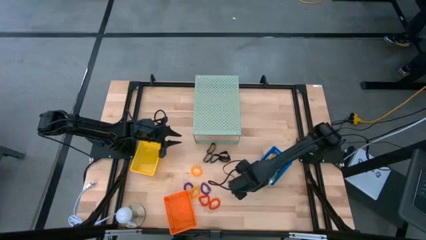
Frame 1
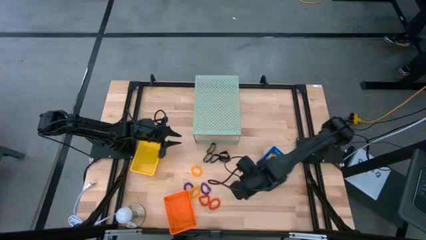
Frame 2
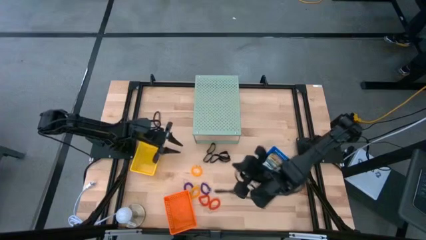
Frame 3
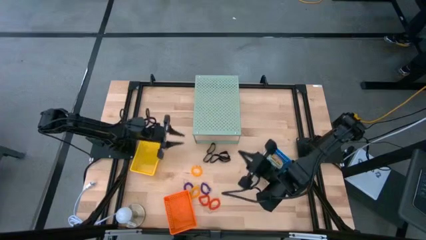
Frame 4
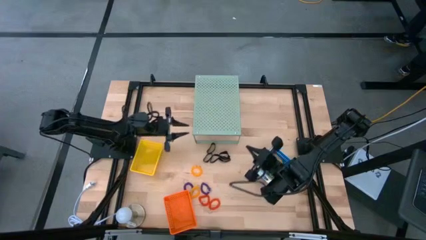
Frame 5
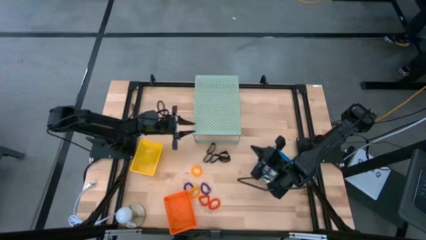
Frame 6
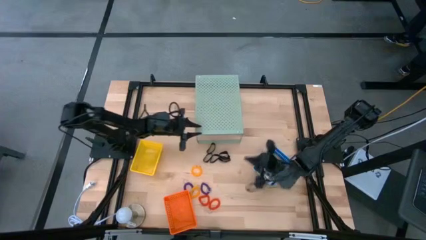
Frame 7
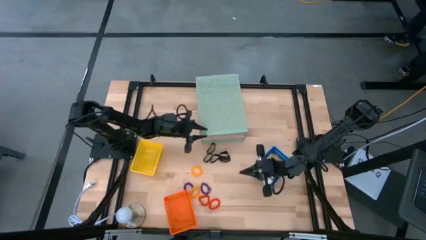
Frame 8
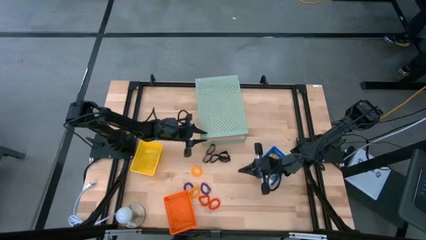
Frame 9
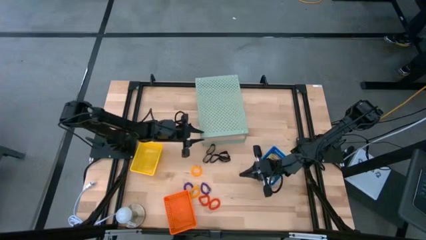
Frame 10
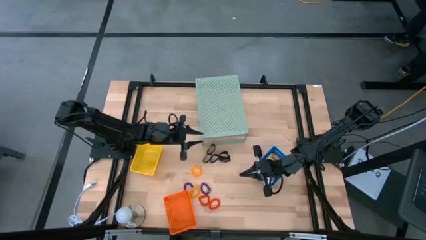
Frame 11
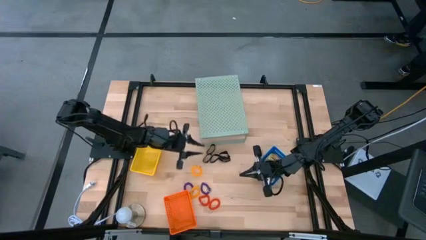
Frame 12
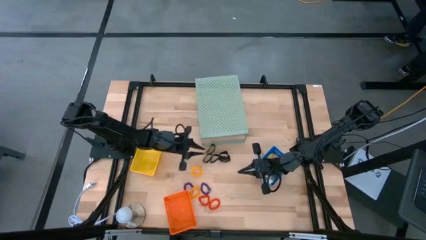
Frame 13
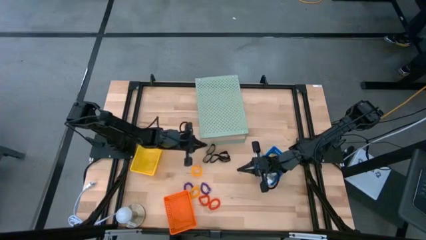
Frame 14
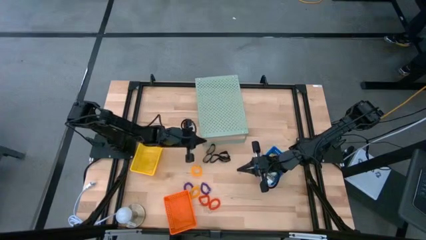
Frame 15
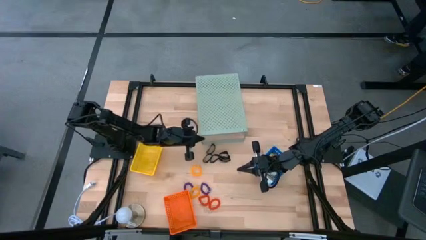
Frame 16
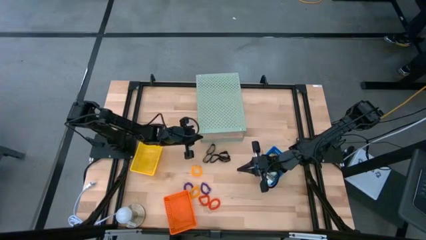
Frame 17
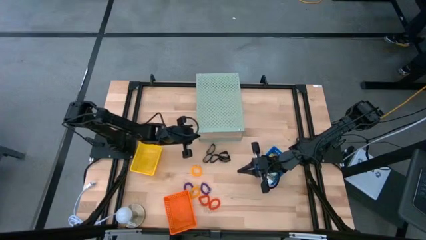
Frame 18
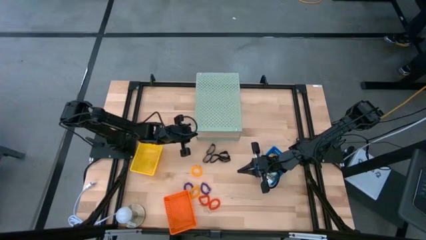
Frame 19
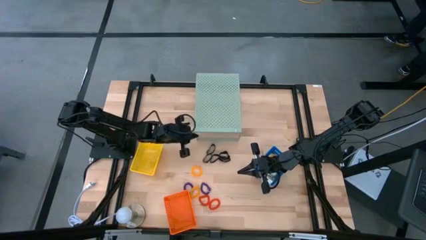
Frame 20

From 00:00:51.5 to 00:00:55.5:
Task: Pick & Place Office Desk Supplies
Adjust the shelf

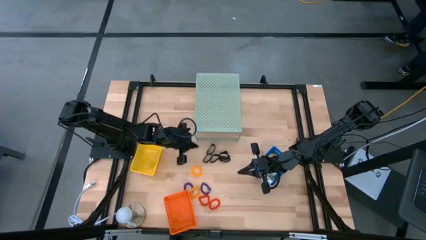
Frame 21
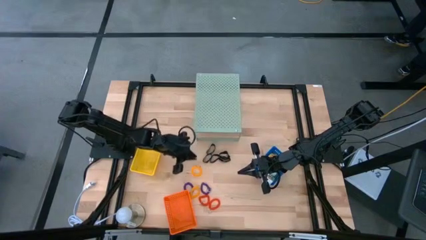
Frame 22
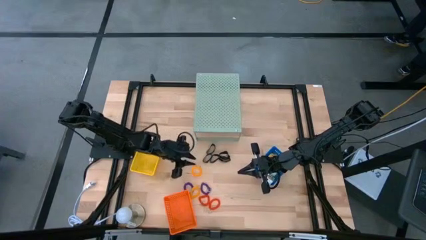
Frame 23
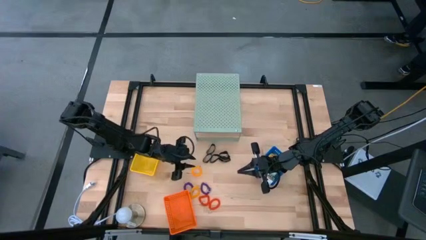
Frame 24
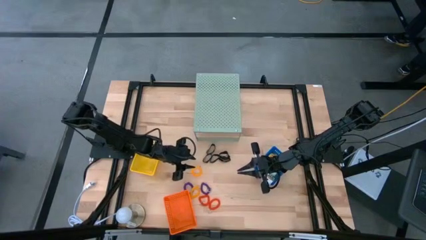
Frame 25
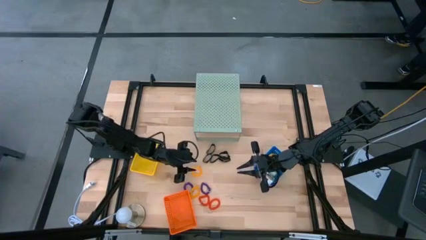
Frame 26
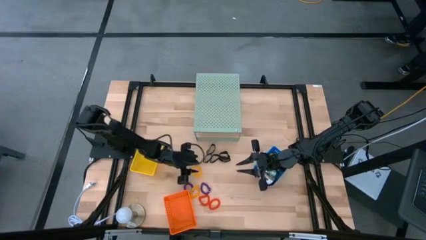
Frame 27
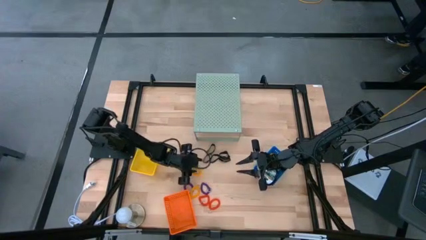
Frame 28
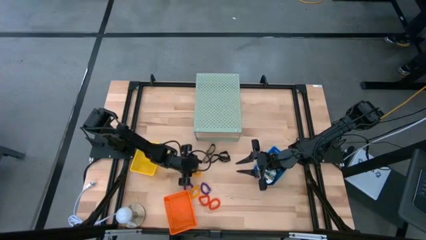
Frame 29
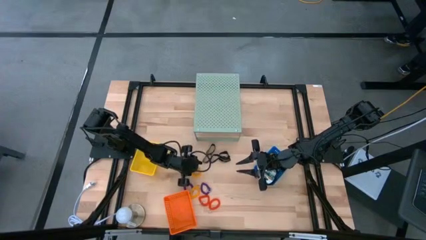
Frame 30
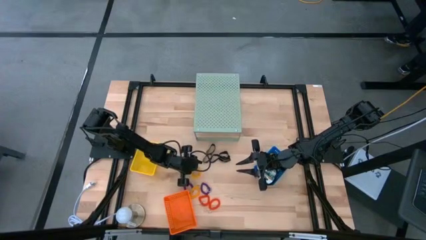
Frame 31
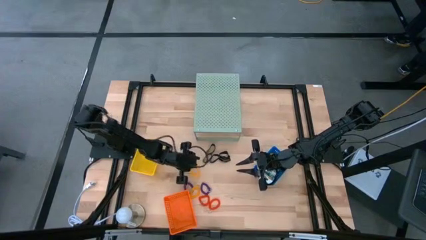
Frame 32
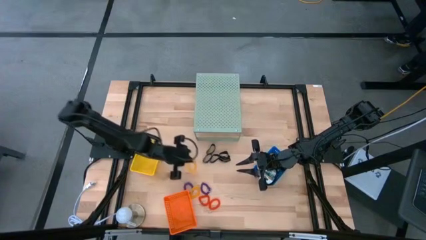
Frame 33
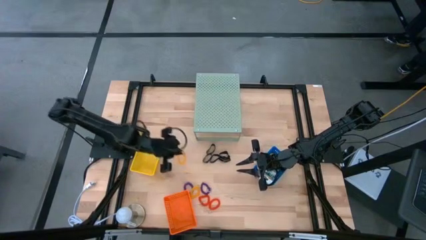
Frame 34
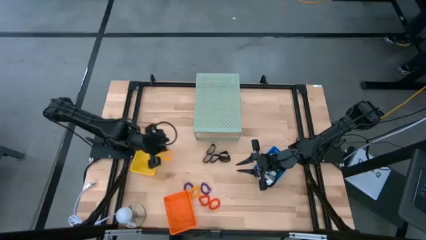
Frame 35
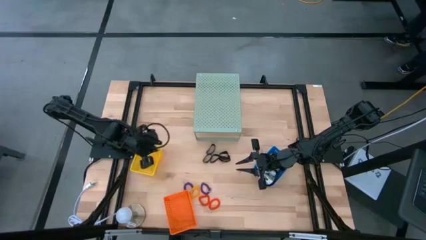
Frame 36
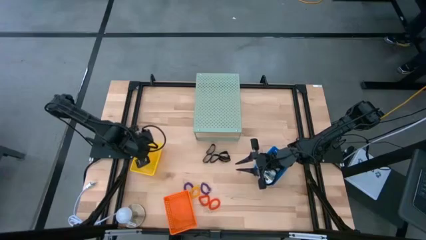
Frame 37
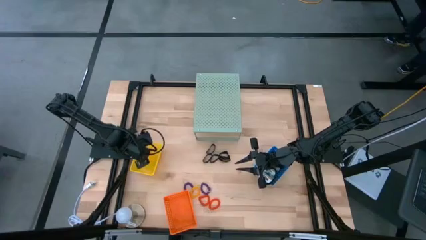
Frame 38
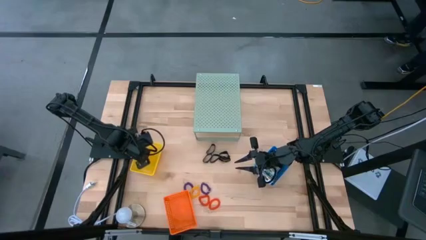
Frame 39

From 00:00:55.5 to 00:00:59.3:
Put the yellow spring keychain into the yellow bin

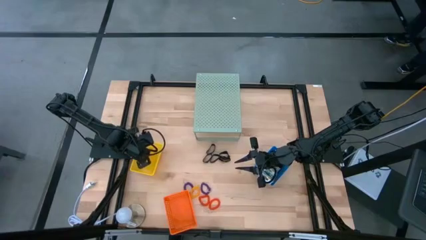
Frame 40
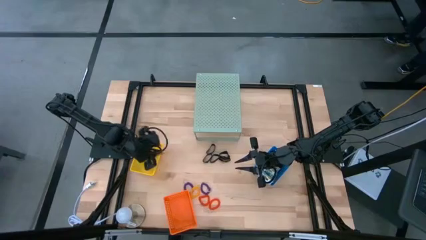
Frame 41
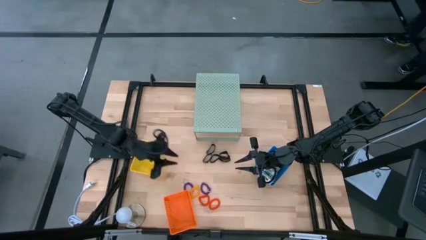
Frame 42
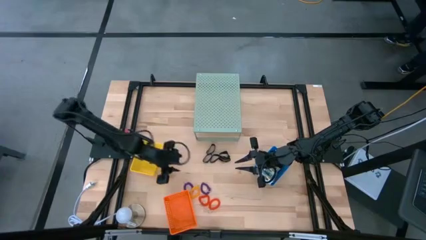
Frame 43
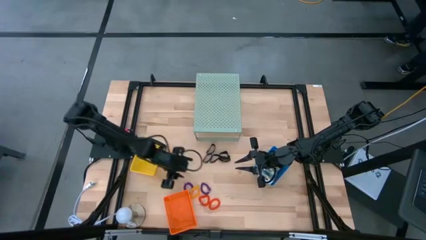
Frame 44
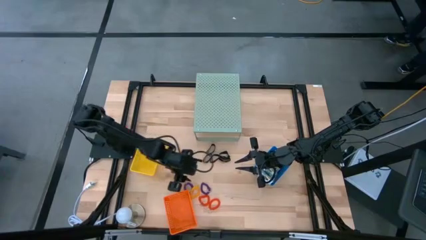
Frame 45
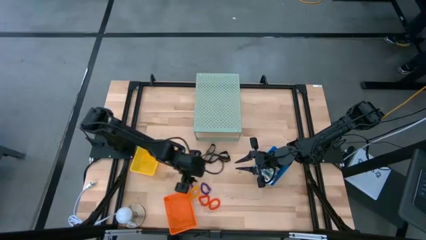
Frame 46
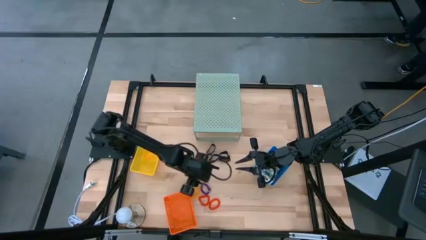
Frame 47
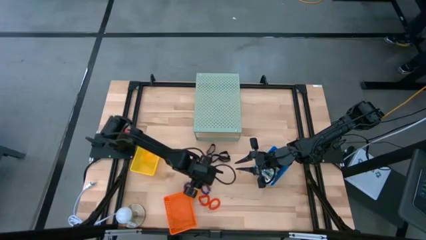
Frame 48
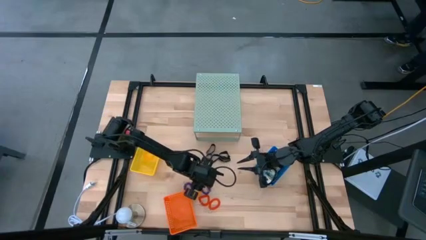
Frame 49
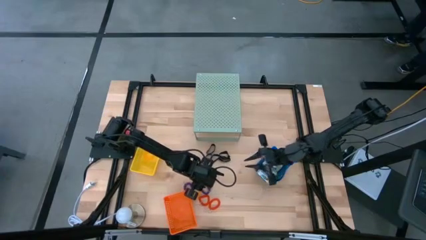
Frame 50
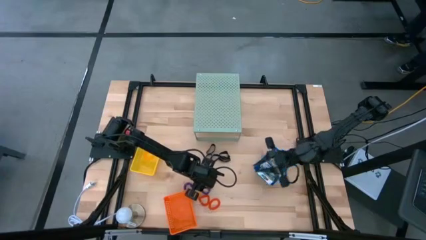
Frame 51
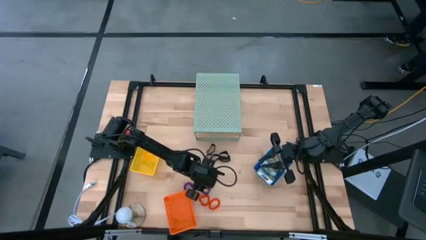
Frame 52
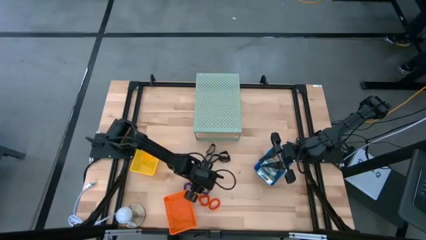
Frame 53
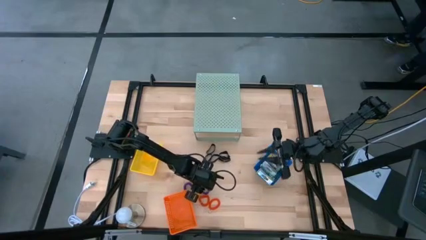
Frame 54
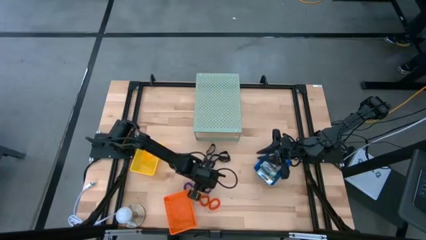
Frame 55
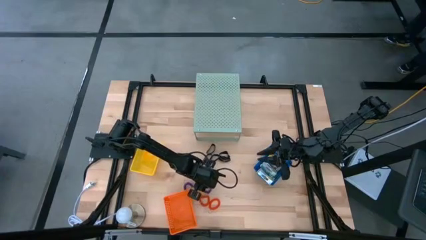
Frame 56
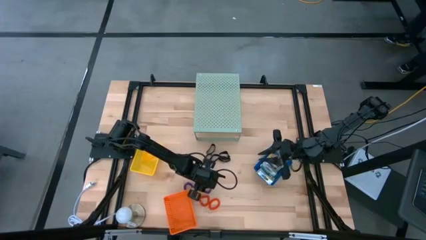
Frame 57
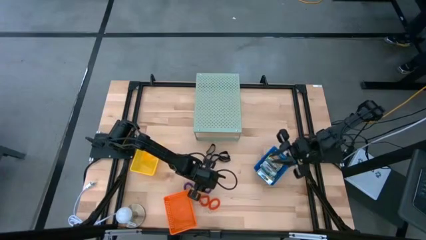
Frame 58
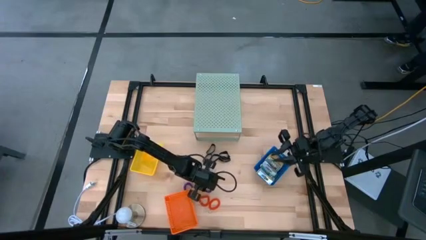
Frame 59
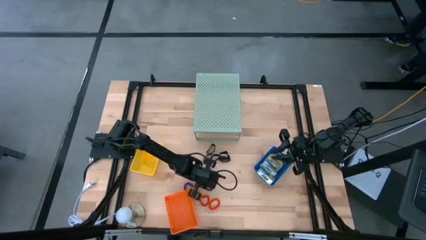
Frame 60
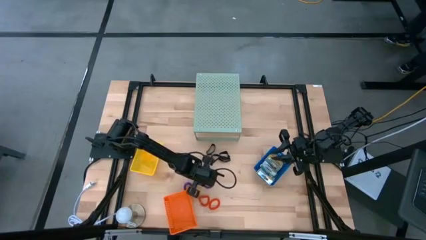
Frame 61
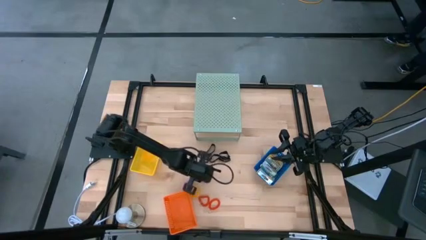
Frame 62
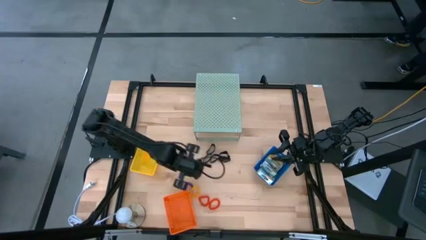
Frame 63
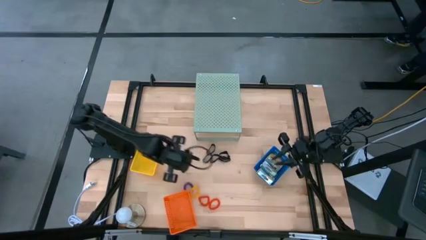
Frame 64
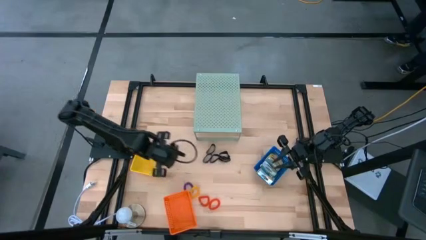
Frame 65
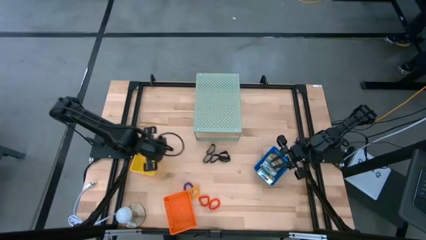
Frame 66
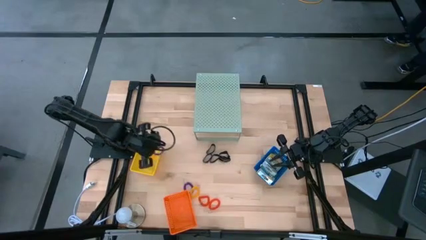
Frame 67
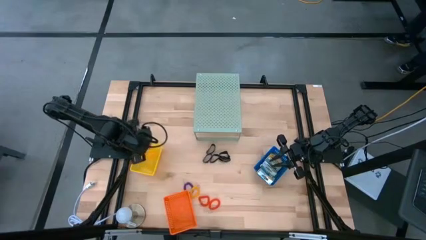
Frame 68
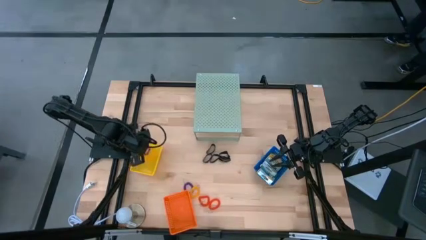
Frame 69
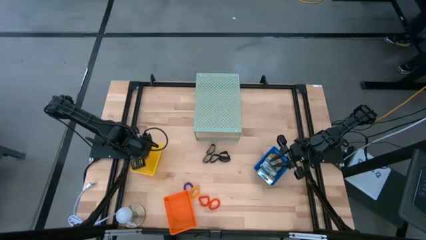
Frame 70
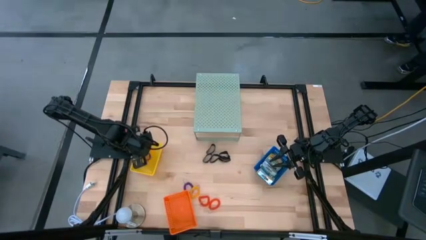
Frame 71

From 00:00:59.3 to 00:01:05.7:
Put the violet spring keychain into the yellow bin
